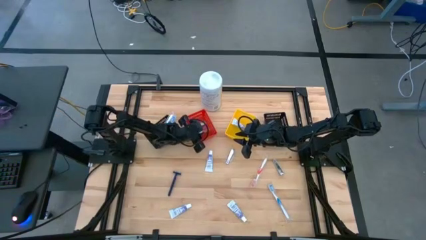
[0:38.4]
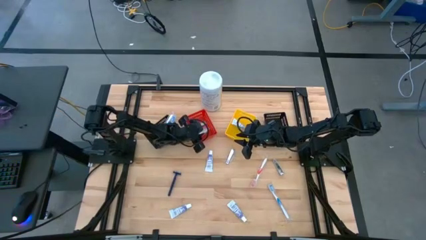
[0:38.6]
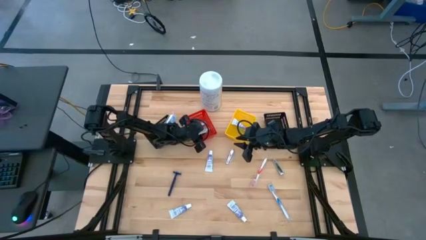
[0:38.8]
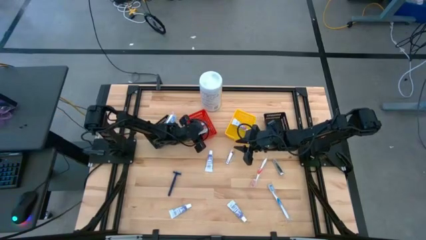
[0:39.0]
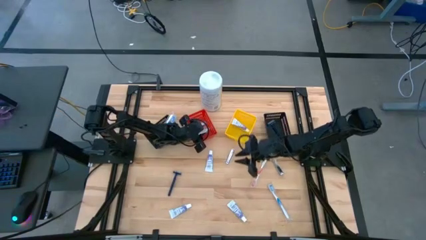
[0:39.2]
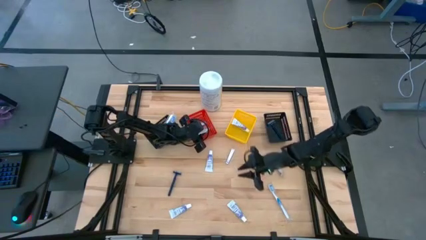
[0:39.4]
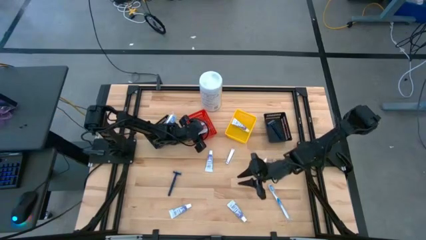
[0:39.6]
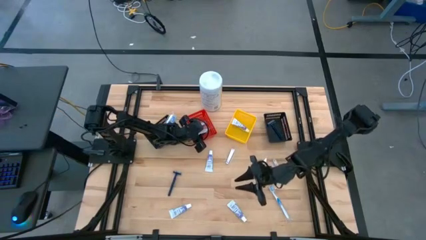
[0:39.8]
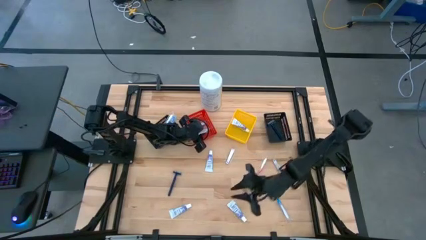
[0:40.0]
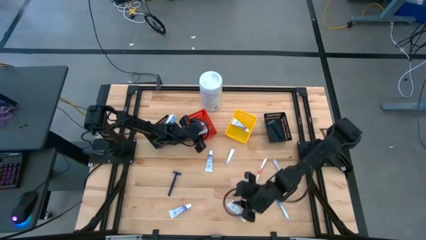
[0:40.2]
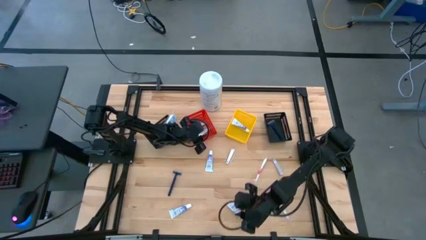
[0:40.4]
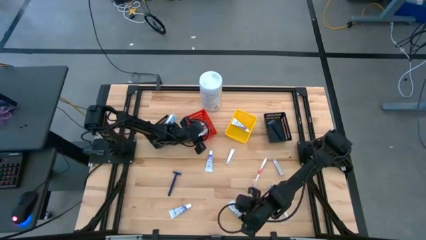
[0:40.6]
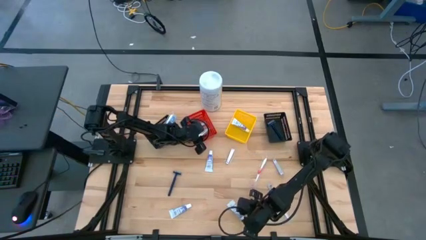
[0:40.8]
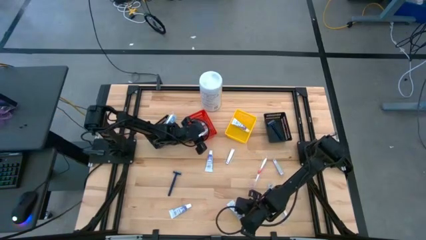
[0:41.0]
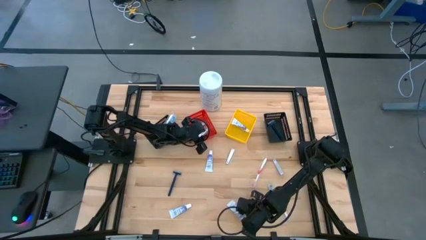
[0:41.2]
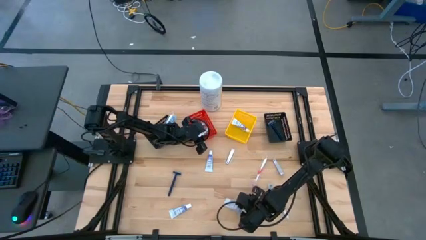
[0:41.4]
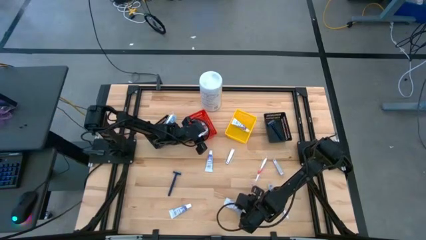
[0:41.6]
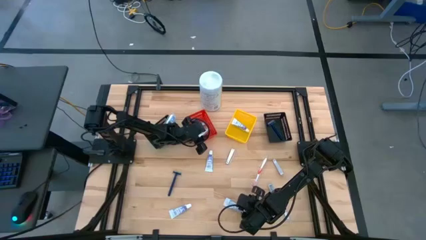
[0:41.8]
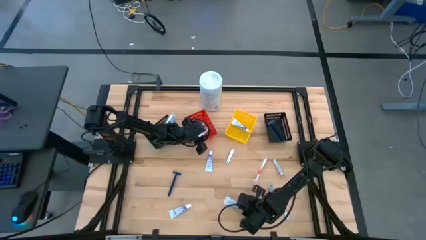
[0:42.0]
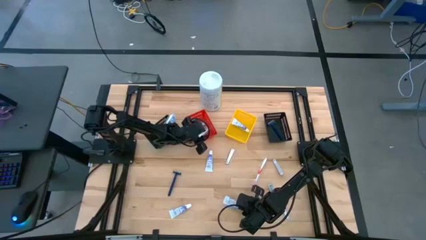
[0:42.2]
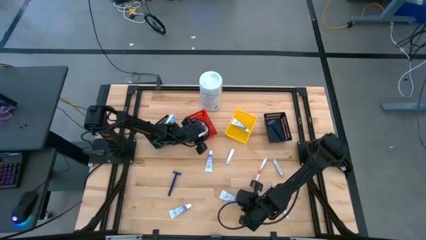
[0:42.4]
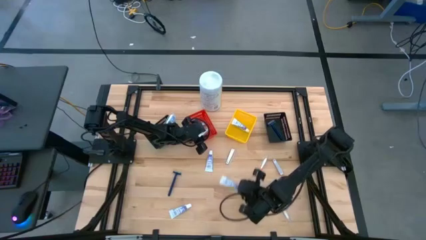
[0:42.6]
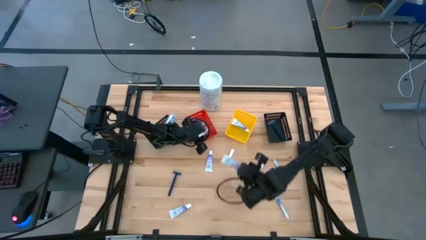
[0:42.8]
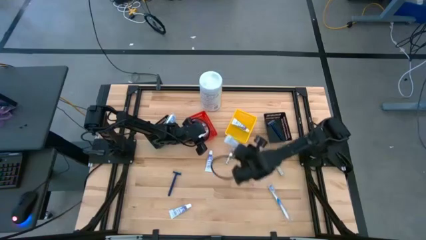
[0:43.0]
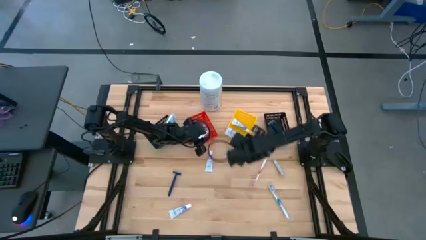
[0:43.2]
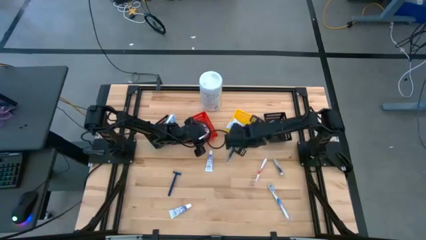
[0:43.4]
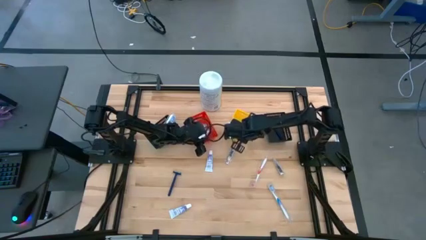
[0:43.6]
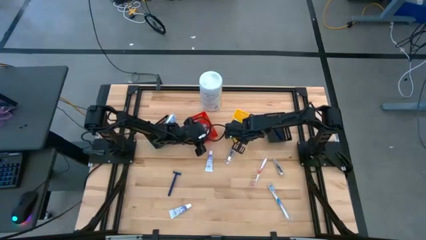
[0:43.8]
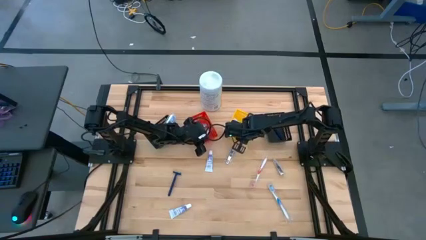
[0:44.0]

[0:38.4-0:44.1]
Task: Pick & Place Travel size toiletries
Put the bottom right white toothpaste into the yellow basket

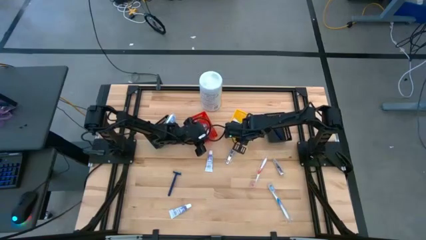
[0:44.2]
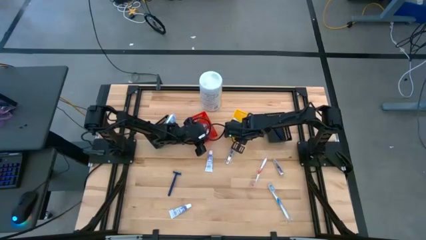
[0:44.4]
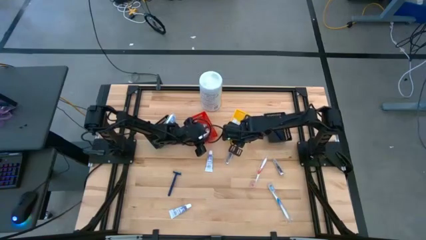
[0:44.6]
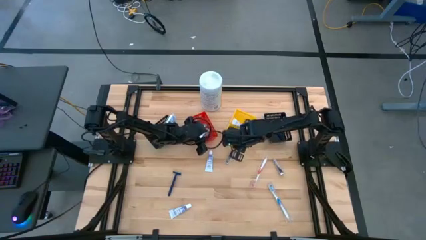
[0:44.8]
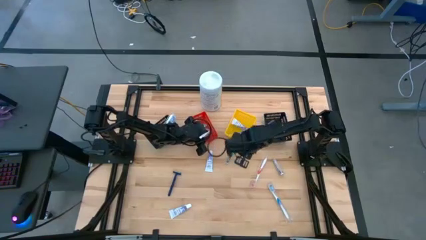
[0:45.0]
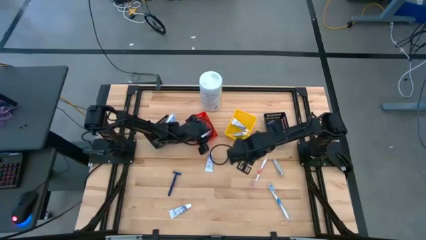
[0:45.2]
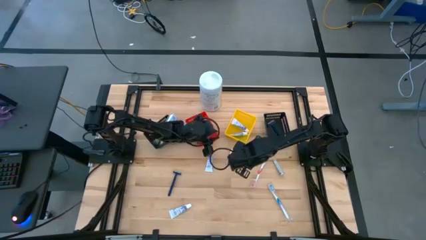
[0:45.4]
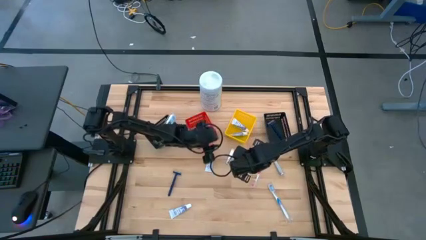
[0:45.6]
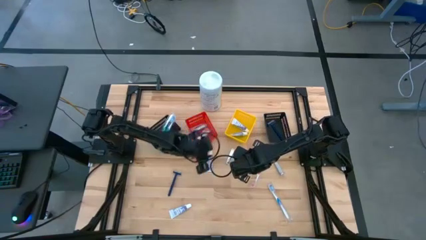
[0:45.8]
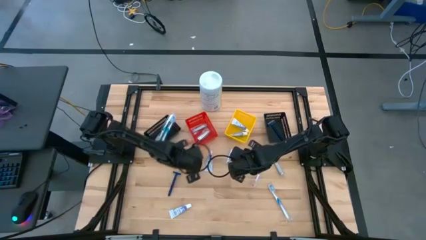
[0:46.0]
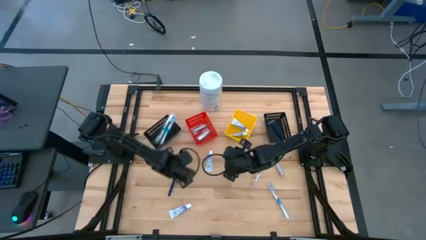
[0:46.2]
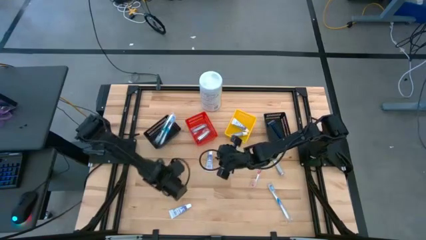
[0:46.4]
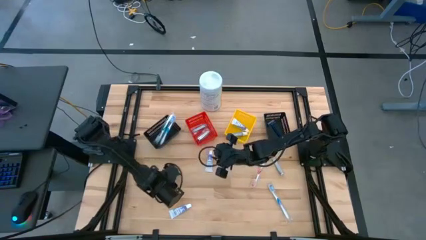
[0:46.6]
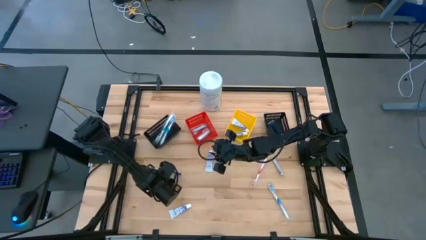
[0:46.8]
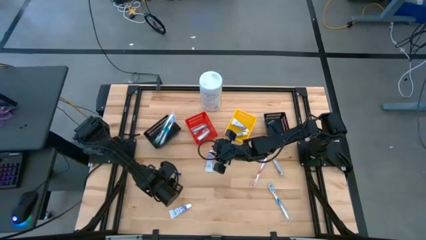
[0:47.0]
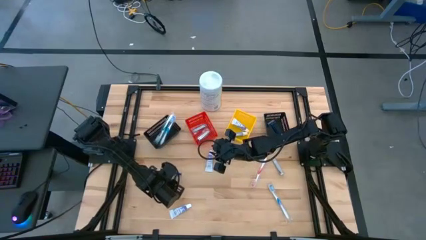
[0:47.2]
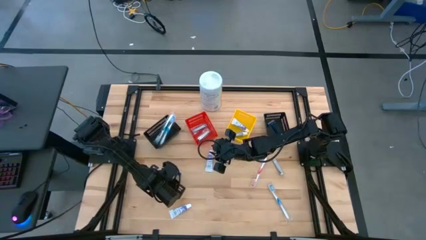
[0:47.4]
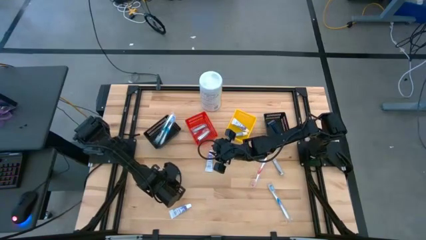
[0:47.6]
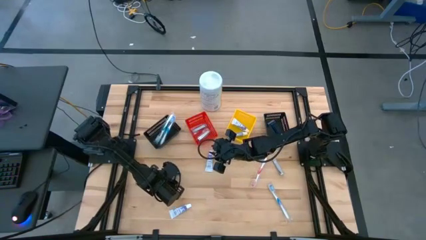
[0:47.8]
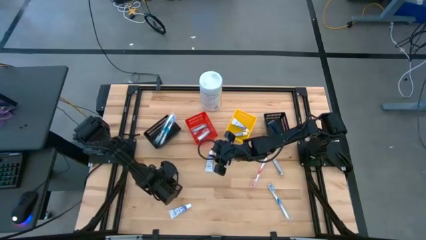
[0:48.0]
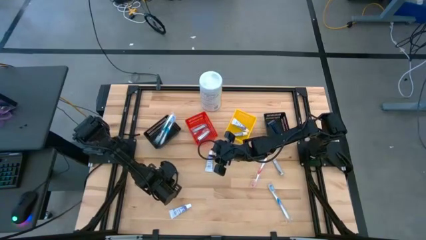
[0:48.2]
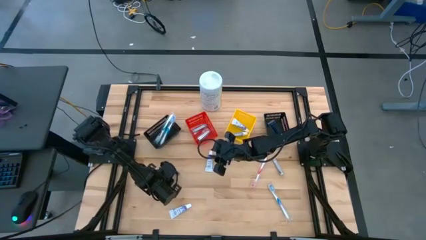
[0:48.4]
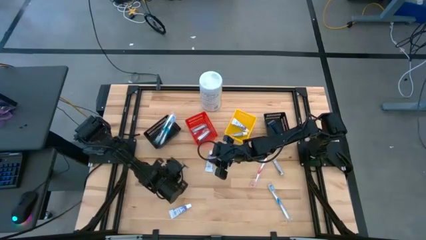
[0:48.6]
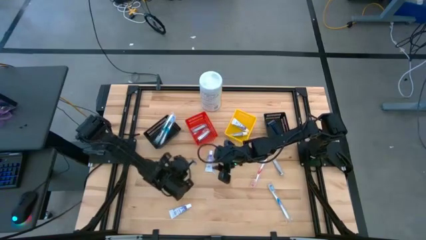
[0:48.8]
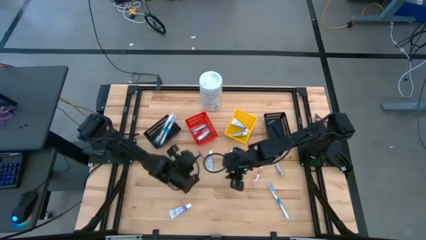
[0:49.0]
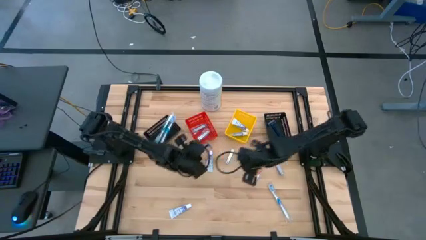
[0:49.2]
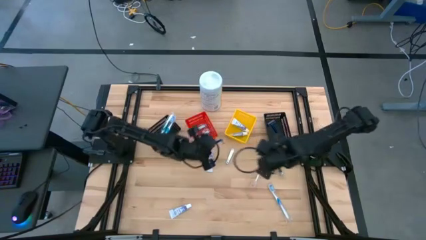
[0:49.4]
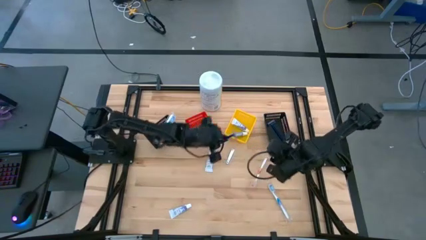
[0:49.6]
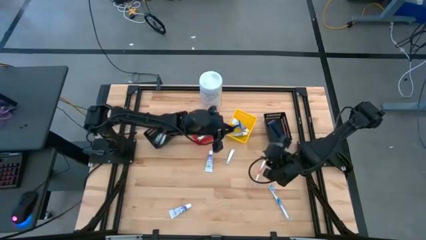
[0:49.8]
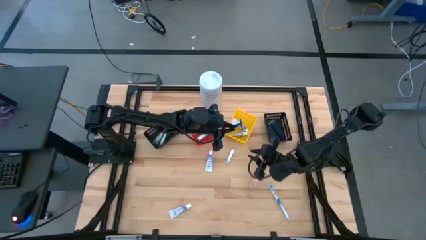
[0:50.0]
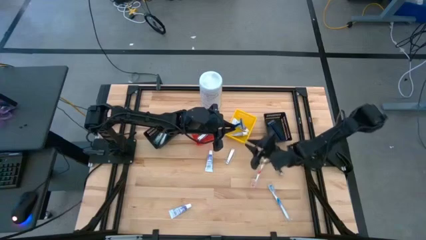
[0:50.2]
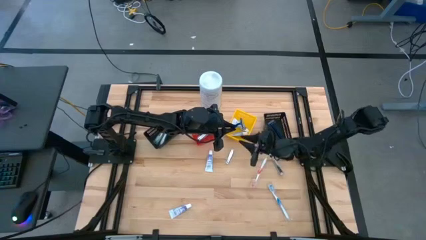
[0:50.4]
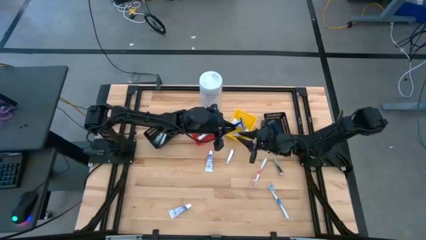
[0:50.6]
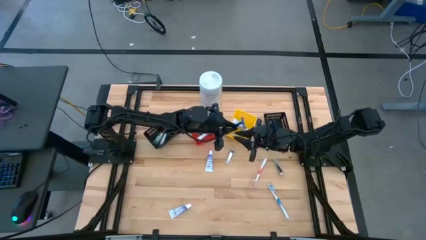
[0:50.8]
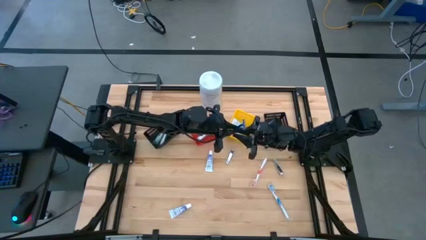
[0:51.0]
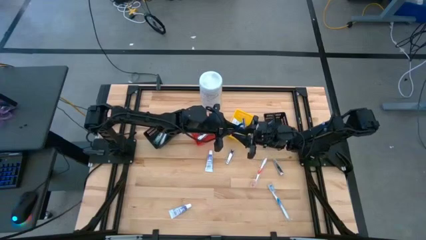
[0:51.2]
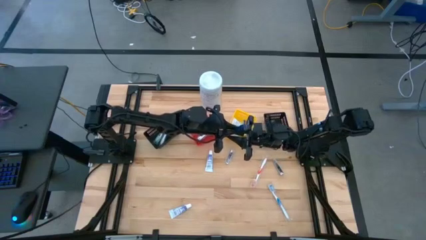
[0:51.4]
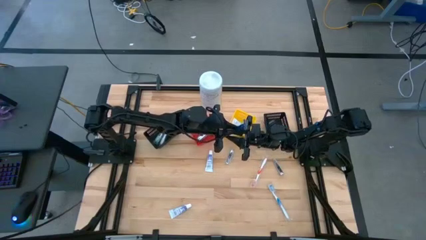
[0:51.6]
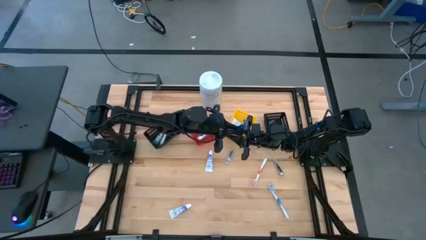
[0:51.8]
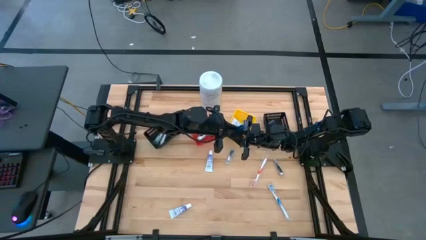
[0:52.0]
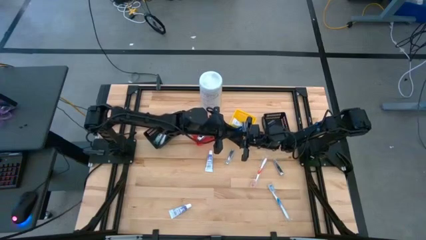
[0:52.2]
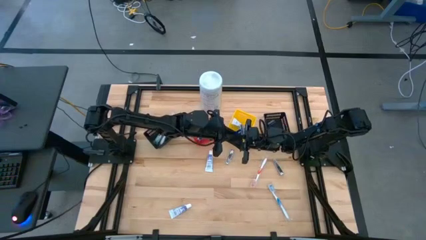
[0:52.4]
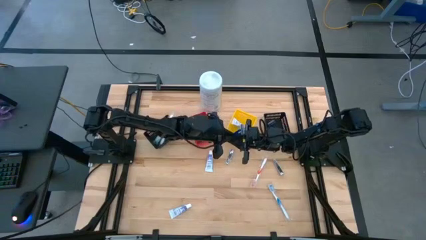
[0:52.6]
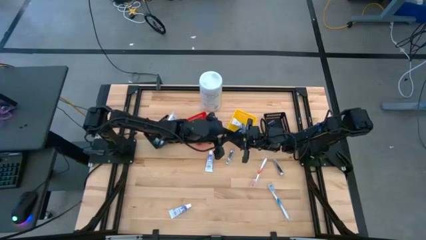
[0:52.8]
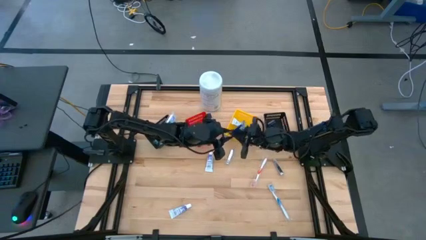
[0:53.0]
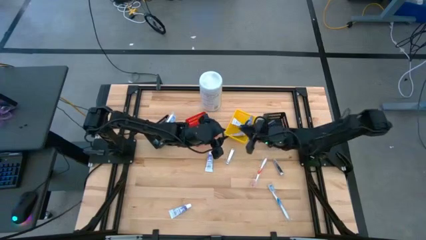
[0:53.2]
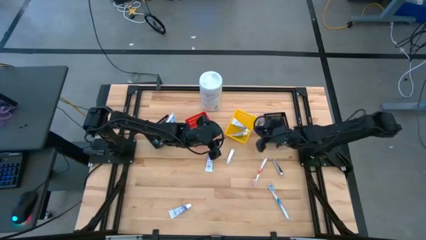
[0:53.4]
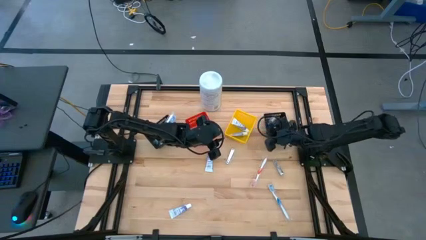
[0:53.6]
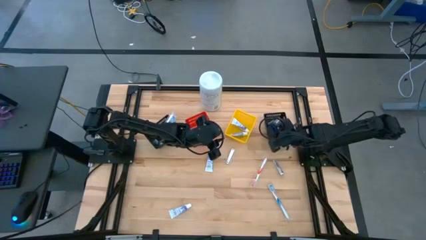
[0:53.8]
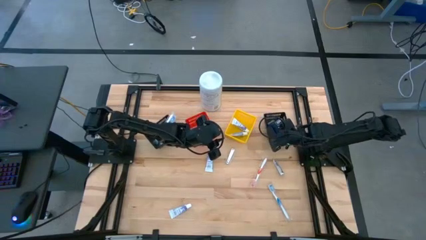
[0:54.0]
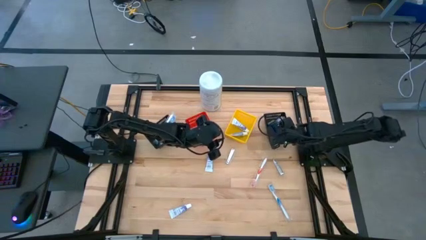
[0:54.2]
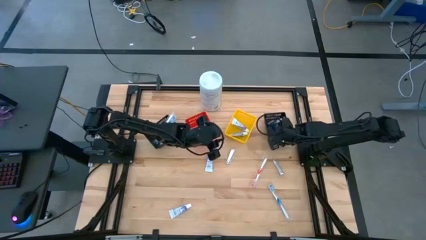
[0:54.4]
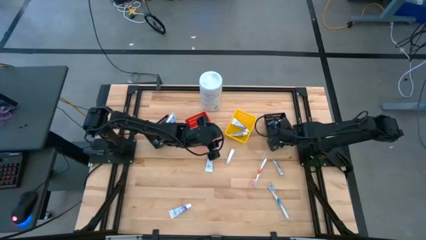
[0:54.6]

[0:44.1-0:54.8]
Put the blue razor into the right black basket
